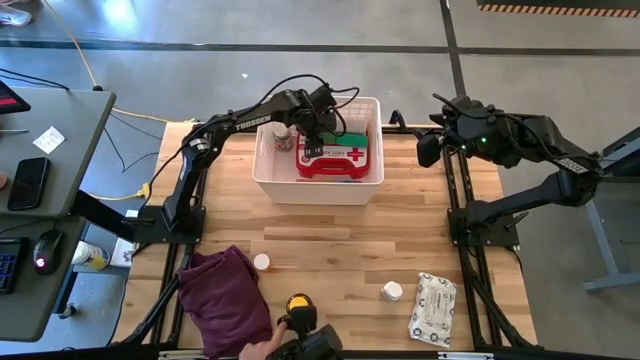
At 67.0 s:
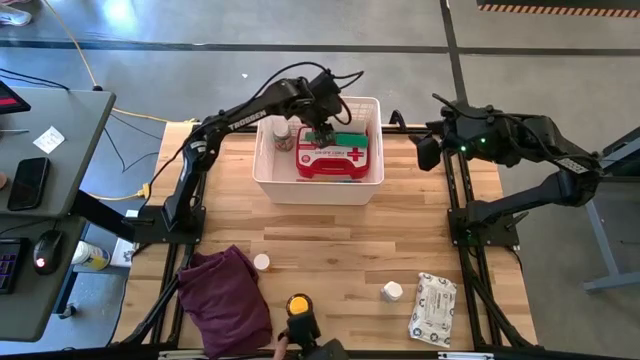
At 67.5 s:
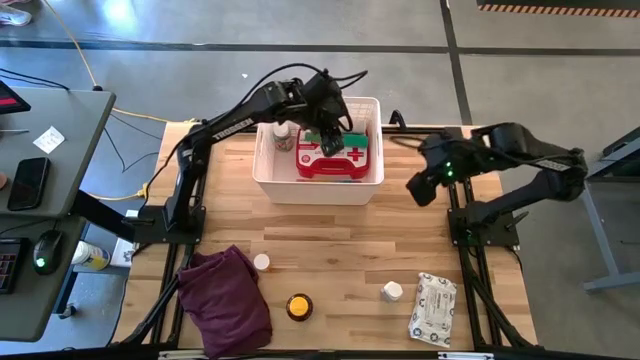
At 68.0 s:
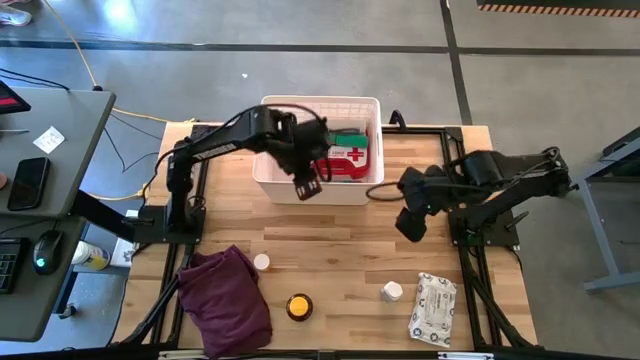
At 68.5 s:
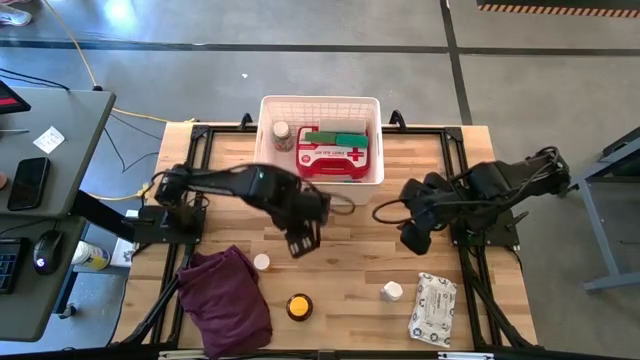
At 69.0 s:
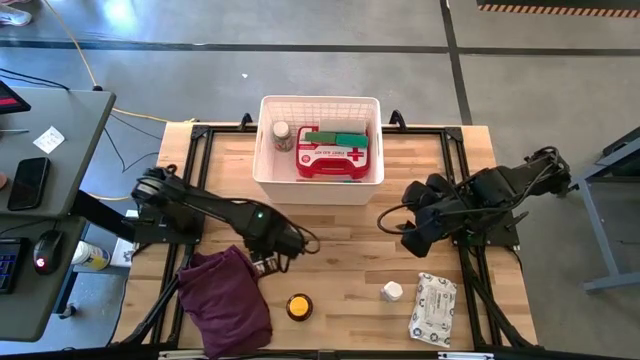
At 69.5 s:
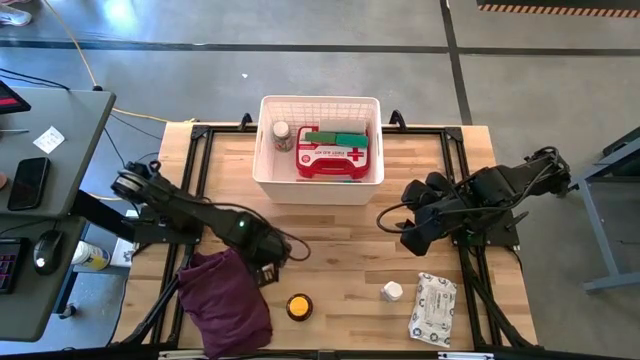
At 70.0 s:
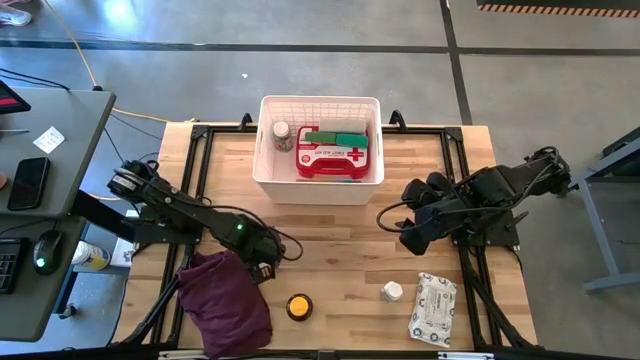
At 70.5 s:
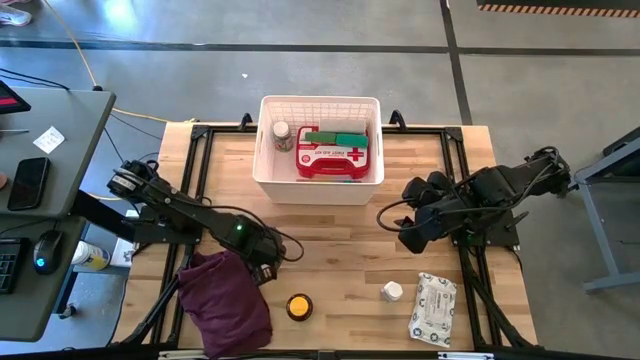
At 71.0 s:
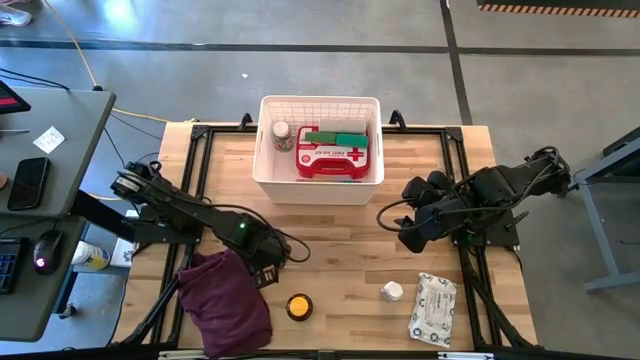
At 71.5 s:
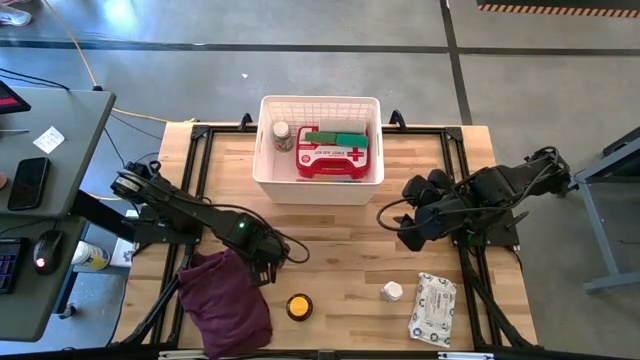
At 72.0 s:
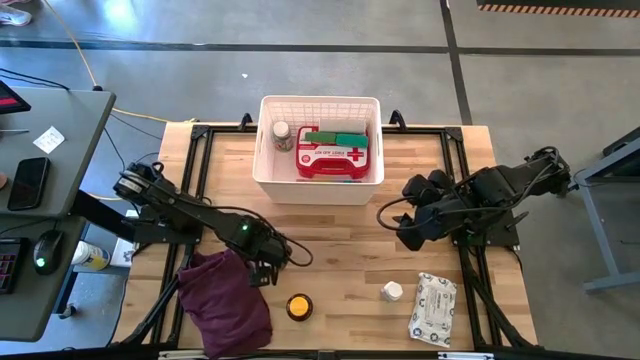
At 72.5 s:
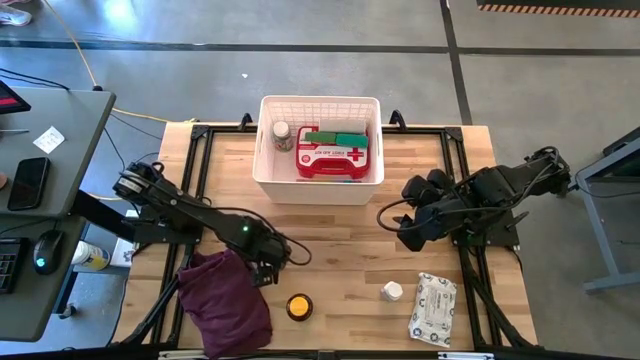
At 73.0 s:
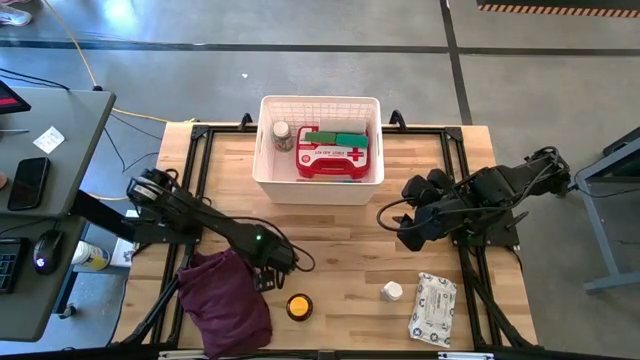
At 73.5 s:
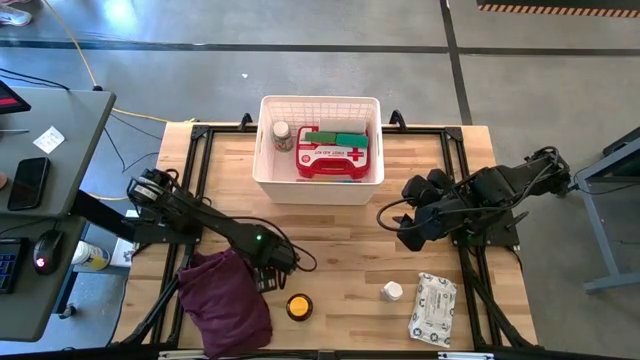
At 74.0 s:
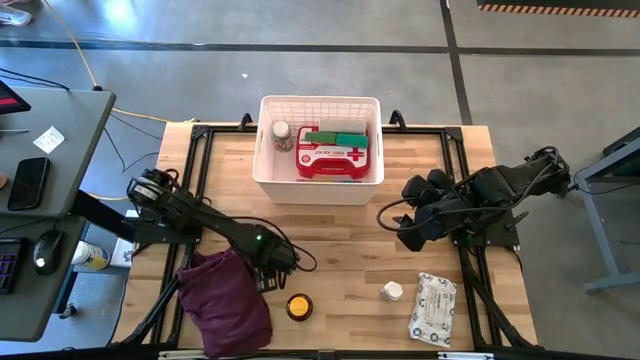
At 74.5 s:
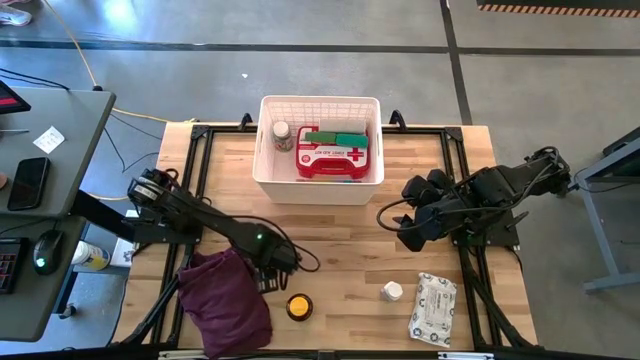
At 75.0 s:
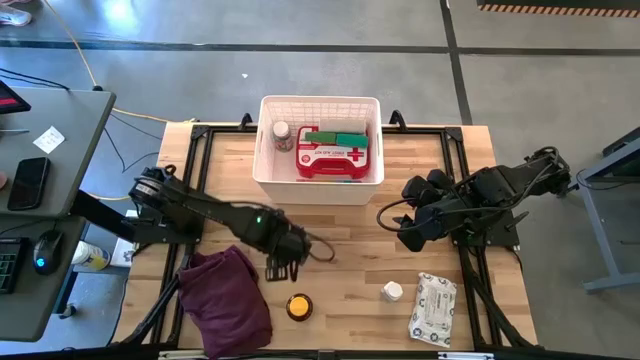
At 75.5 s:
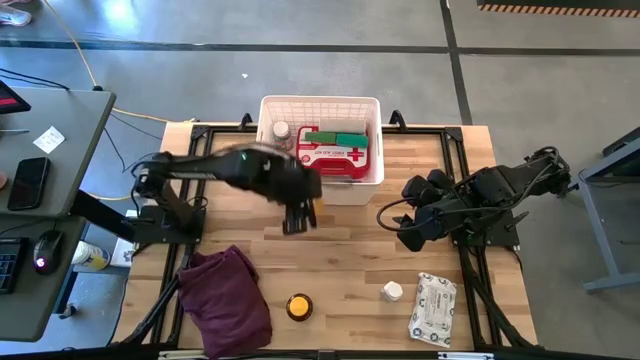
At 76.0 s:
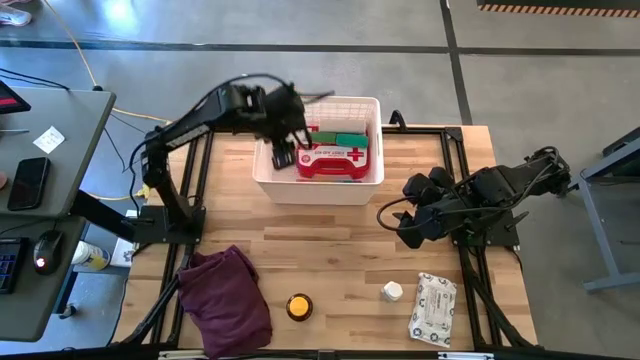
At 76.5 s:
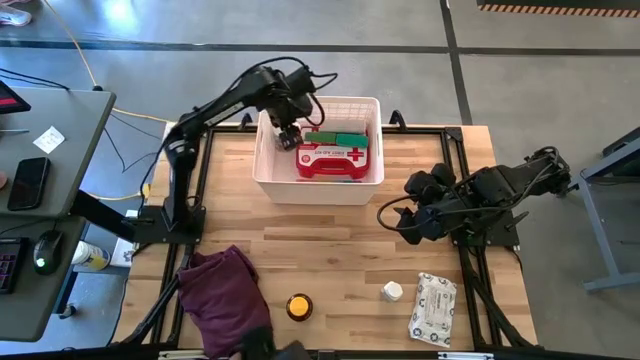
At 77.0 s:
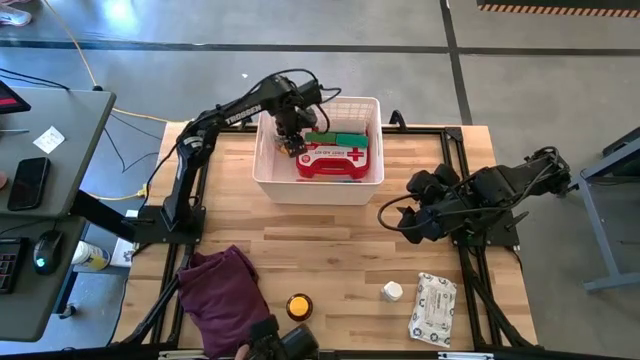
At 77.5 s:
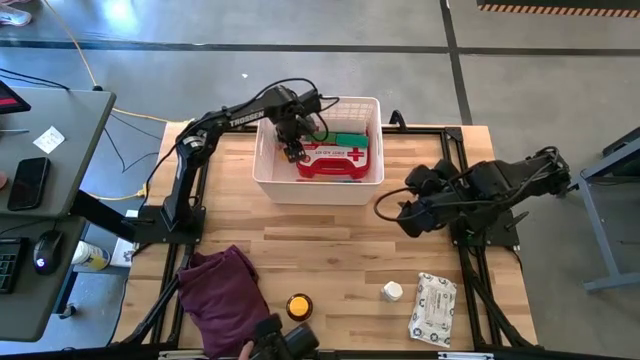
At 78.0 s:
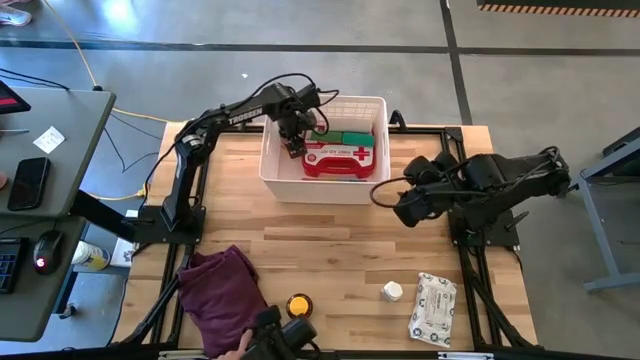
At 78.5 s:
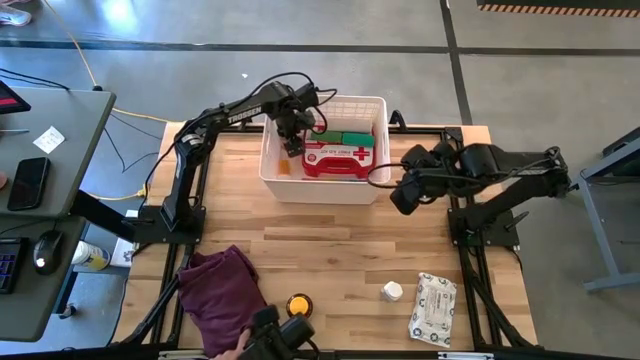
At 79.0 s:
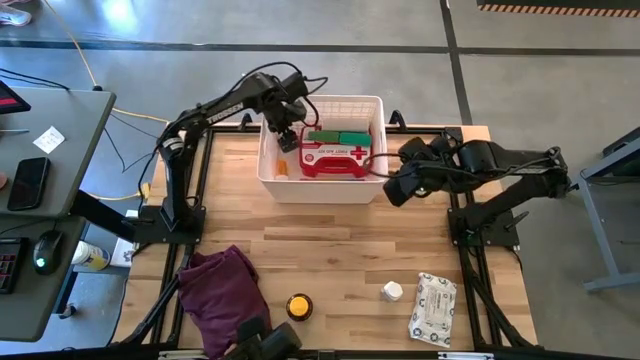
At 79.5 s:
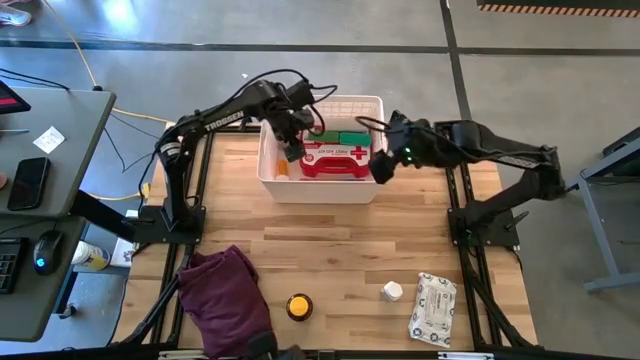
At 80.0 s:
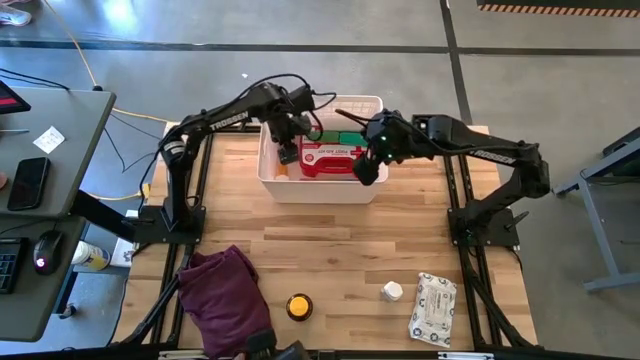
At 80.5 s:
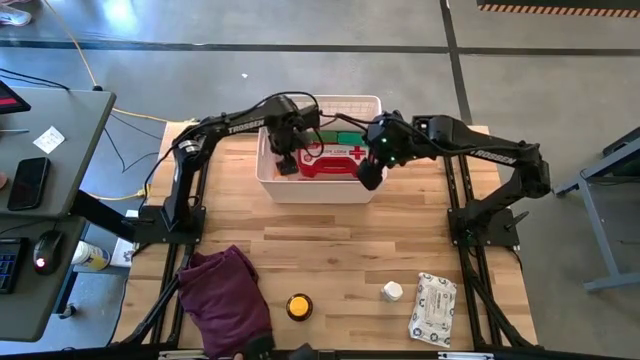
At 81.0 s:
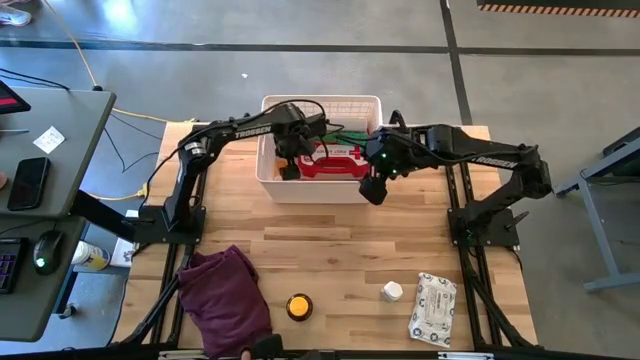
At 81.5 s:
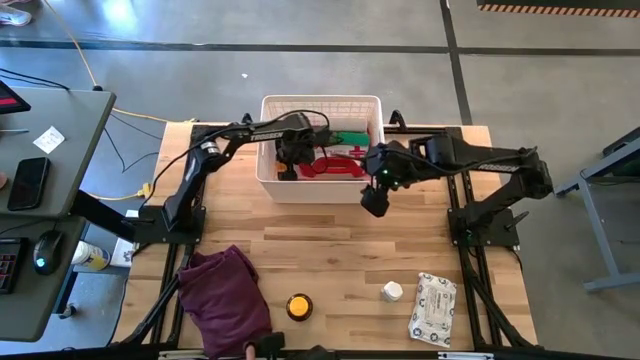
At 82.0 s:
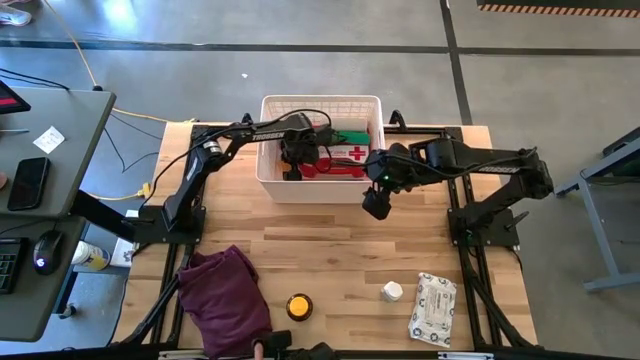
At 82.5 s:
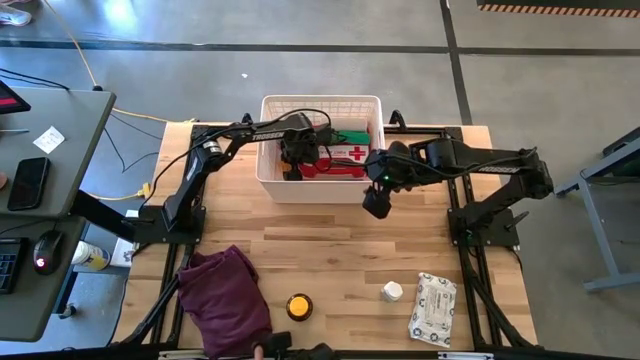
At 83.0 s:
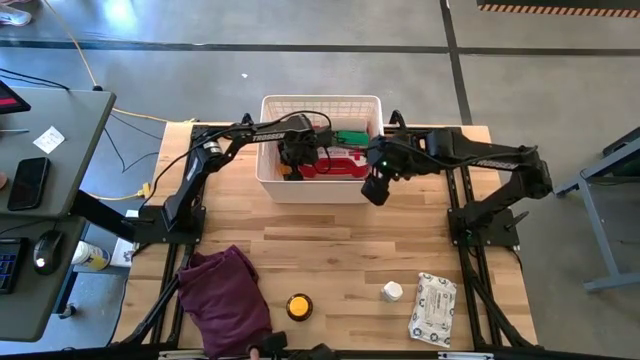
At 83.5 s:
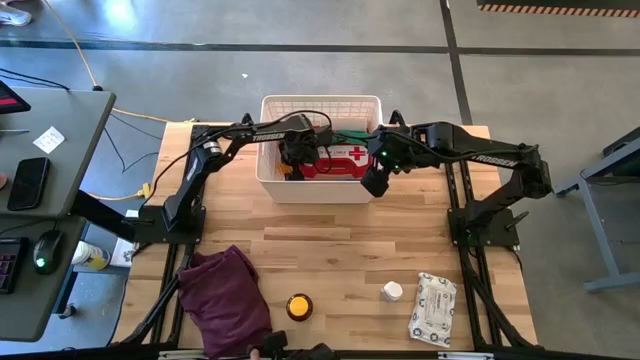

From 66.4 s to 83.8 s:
Task: Pick & place medical supplies in basket/bin
Put the orange pill bottle into the white bin

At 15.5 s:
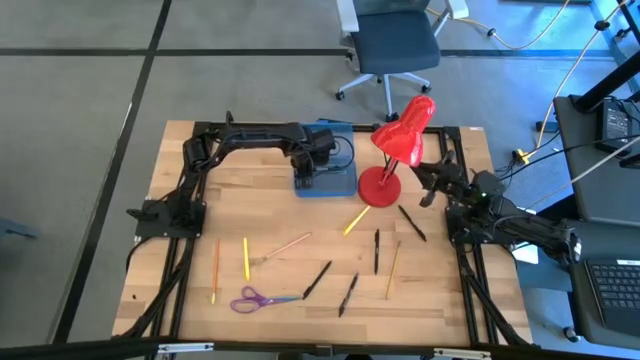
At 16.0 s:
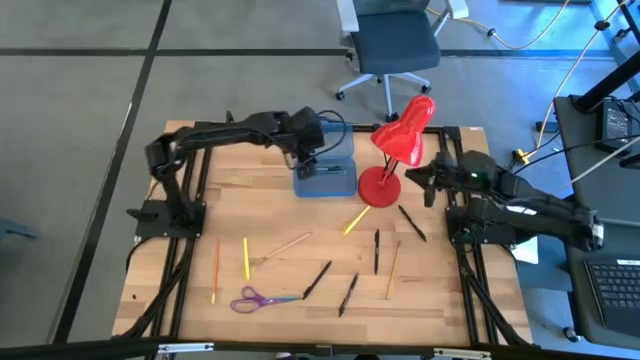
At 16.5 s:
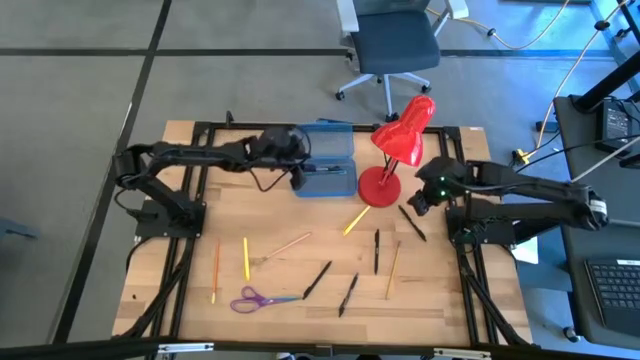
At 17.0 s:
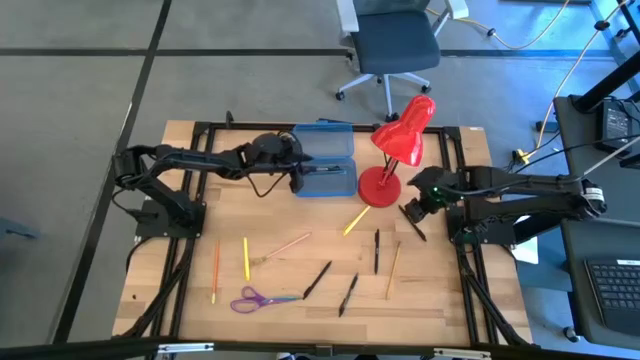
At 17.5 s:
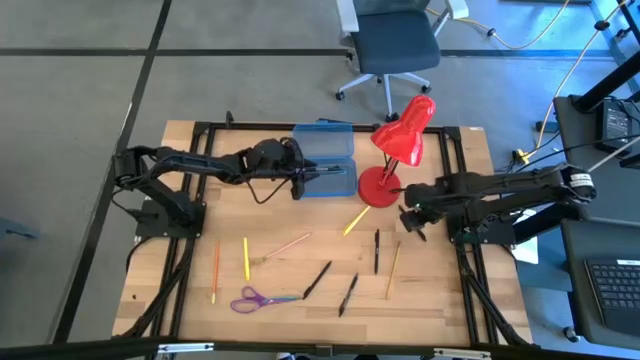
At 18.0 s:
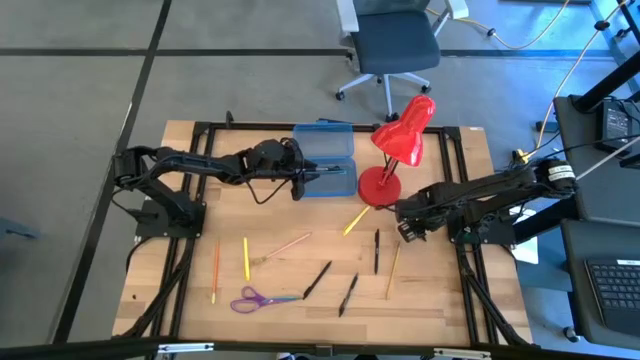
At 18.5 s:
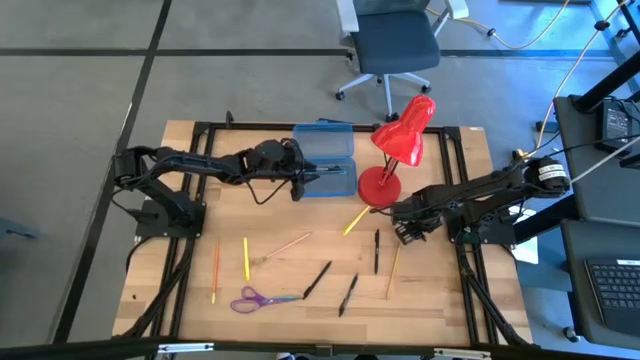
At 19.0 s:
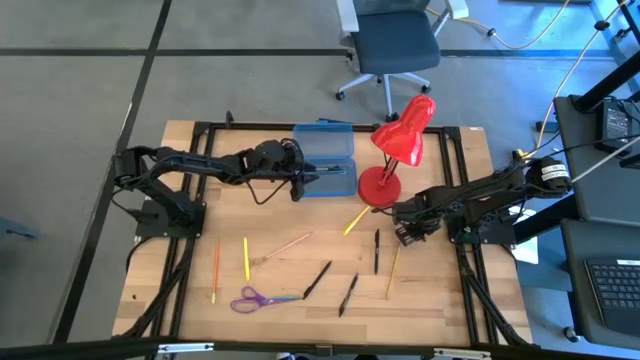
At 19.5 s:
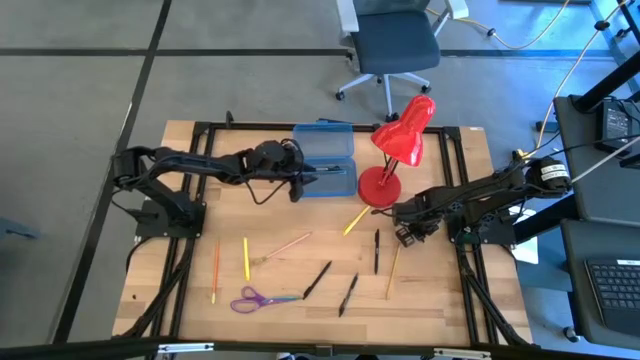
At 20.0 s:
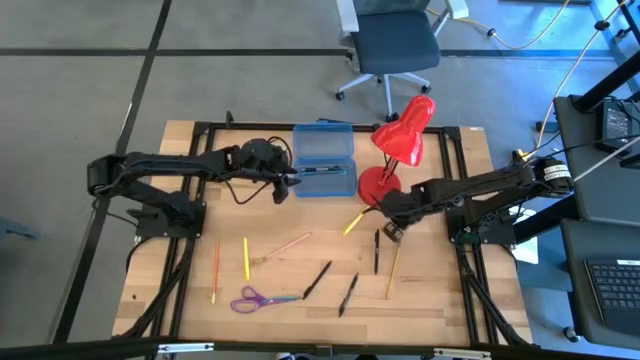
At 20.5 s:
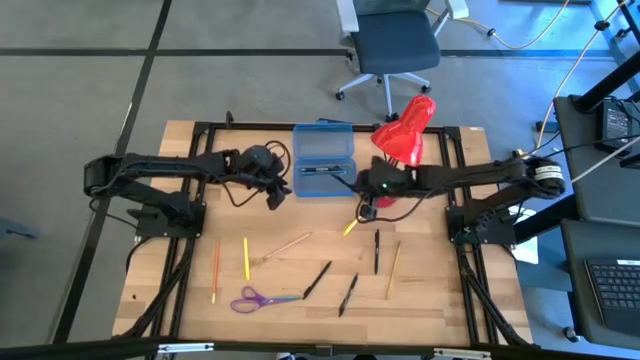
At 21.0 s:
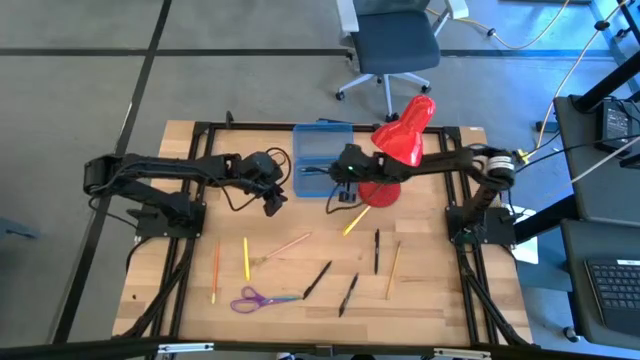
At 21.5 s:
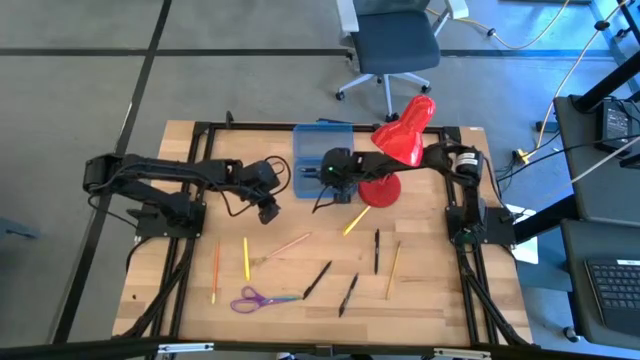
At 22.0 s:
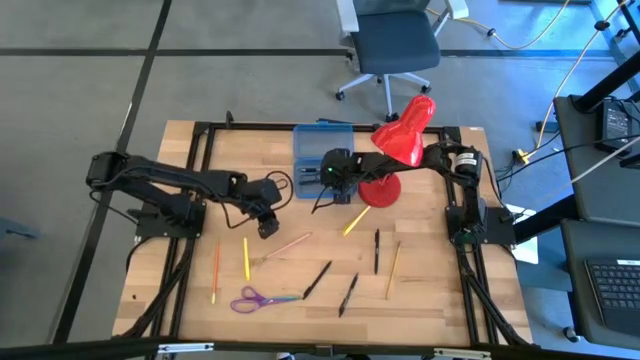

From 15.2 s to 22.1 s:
Task: Pick & place school supplies into a supply box
Put the black pen into the blue supply box
